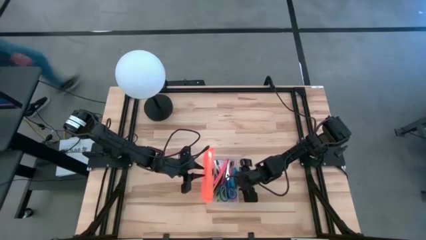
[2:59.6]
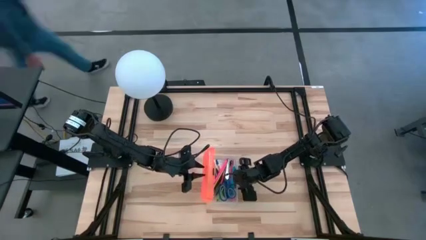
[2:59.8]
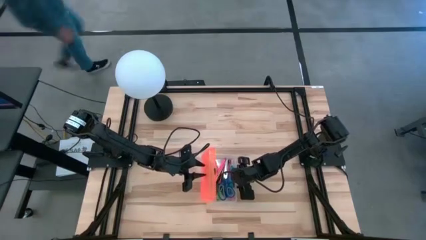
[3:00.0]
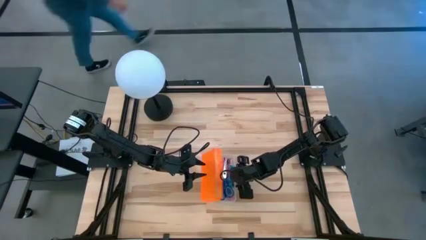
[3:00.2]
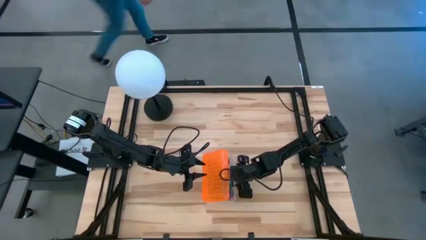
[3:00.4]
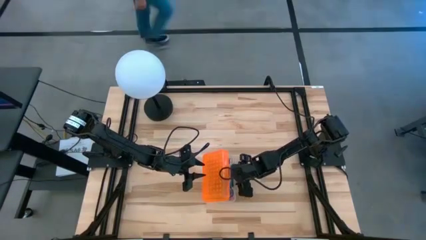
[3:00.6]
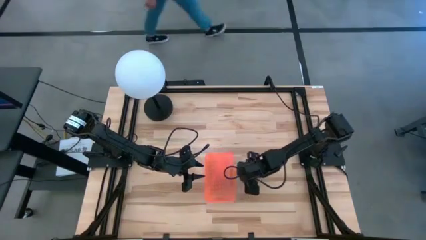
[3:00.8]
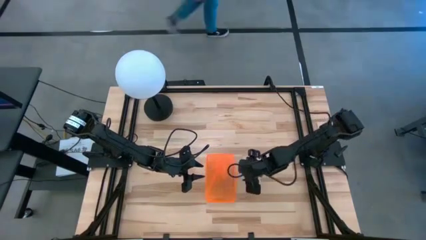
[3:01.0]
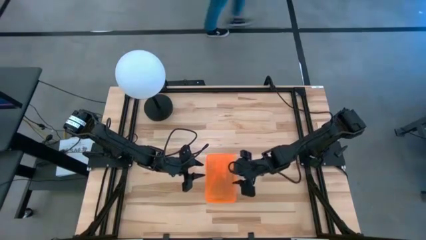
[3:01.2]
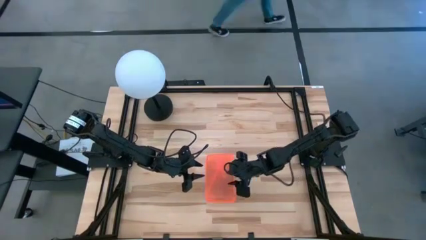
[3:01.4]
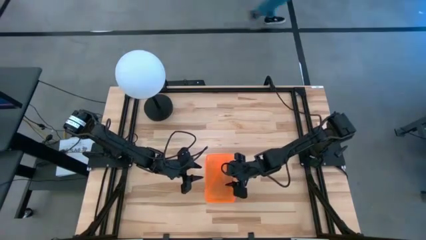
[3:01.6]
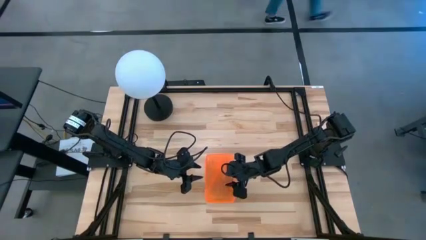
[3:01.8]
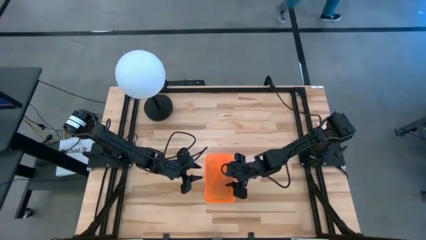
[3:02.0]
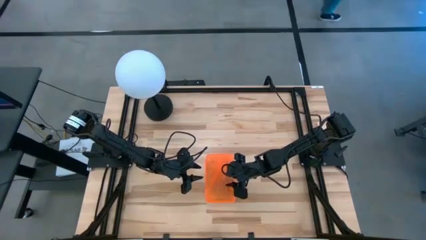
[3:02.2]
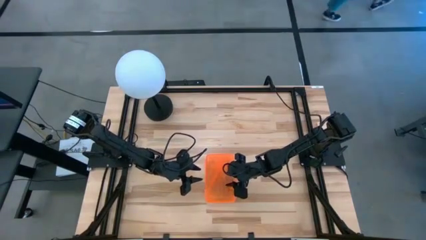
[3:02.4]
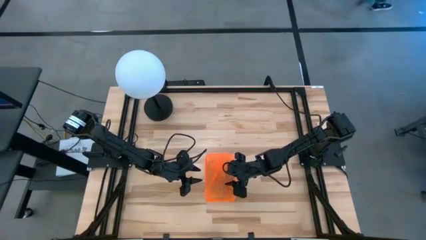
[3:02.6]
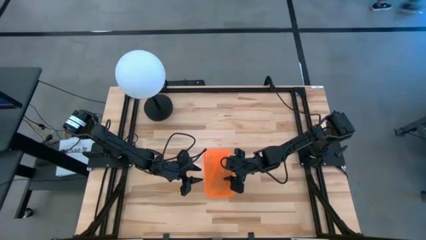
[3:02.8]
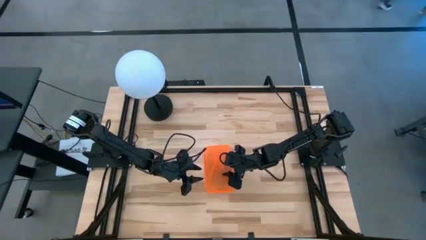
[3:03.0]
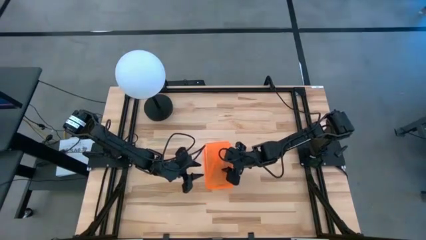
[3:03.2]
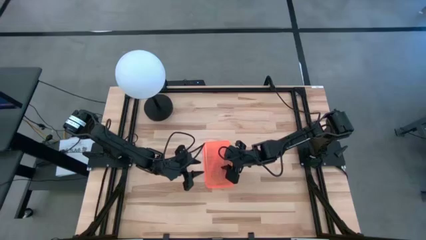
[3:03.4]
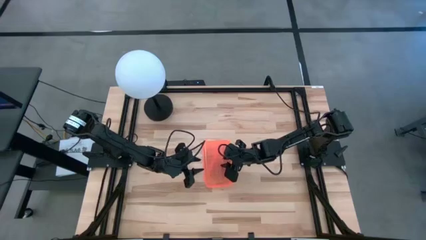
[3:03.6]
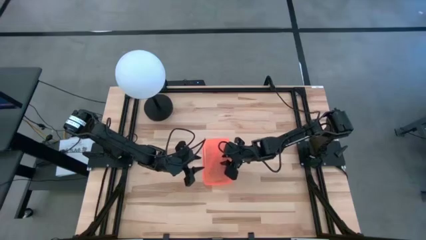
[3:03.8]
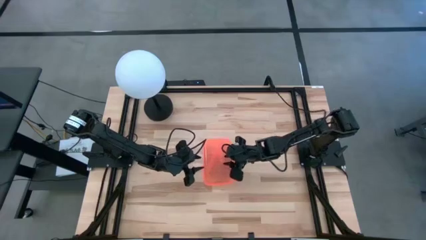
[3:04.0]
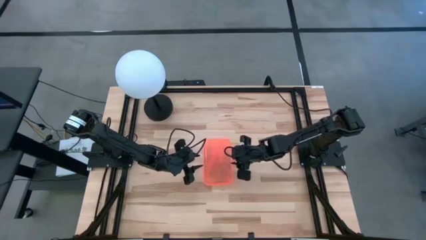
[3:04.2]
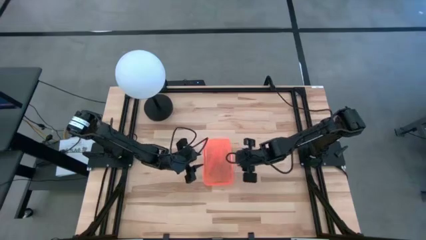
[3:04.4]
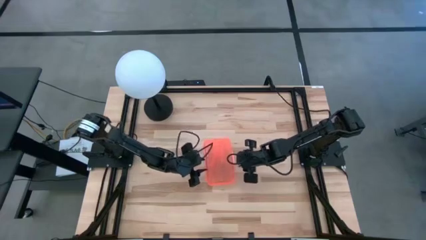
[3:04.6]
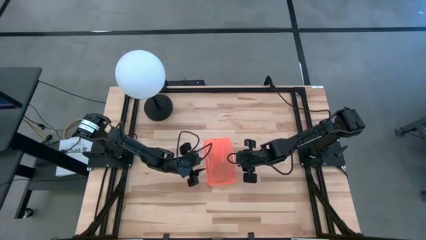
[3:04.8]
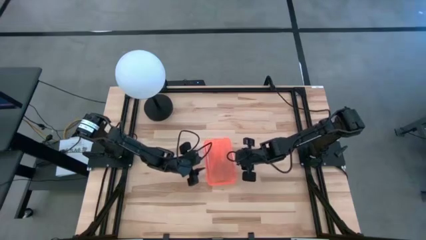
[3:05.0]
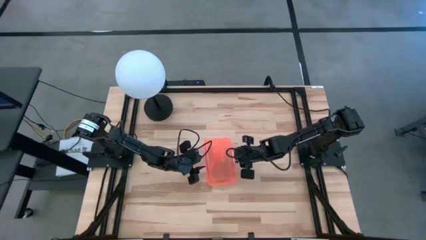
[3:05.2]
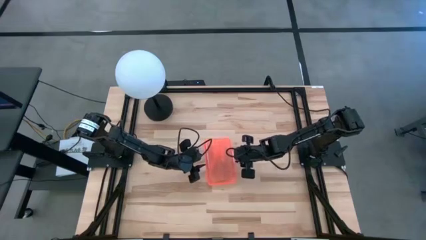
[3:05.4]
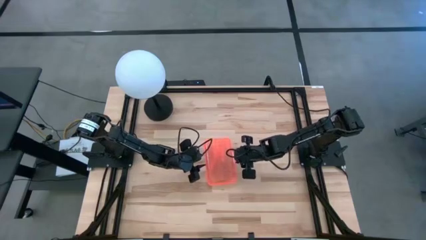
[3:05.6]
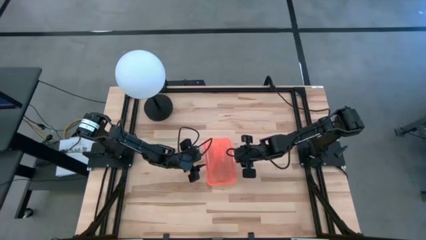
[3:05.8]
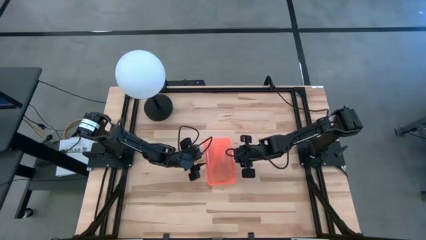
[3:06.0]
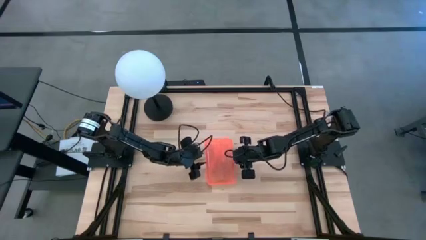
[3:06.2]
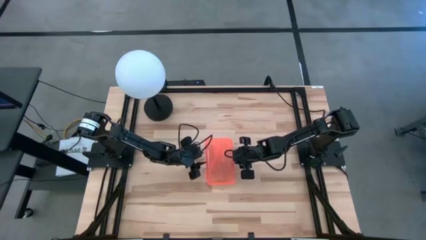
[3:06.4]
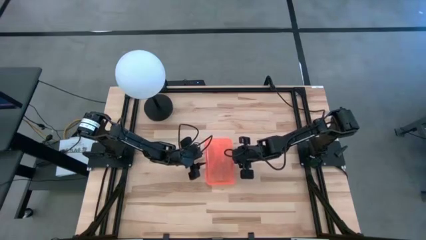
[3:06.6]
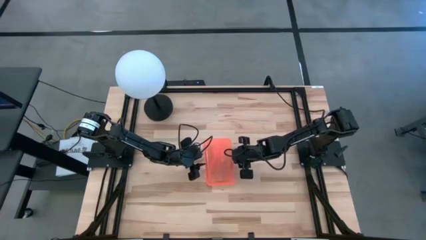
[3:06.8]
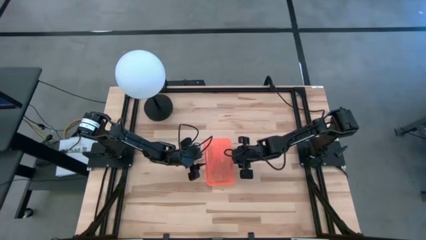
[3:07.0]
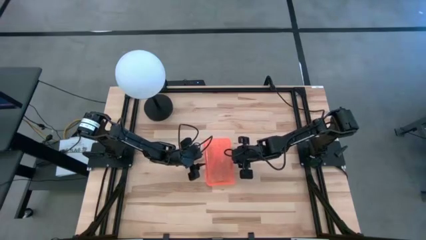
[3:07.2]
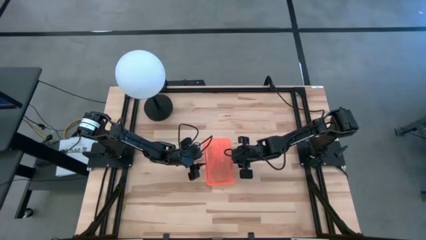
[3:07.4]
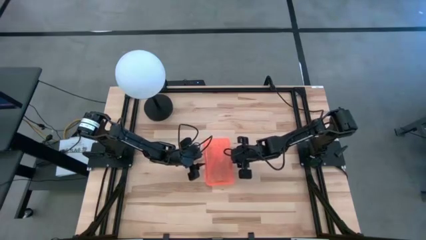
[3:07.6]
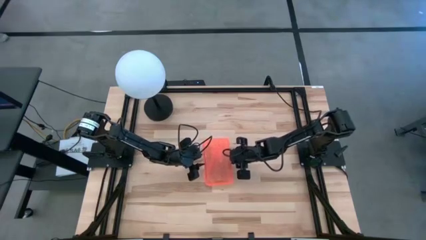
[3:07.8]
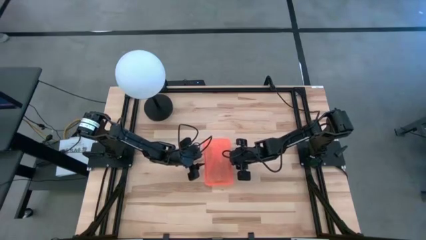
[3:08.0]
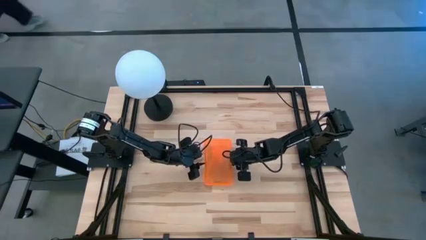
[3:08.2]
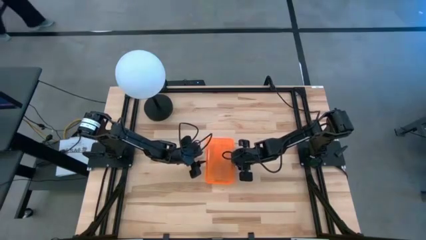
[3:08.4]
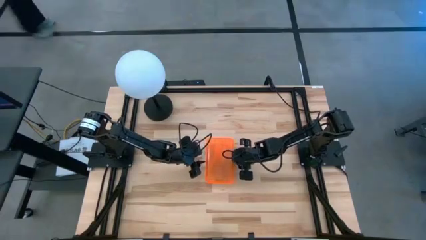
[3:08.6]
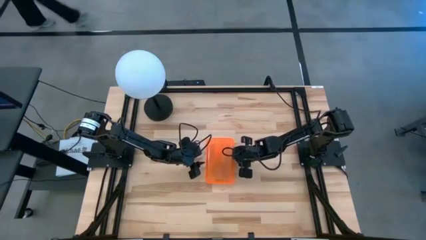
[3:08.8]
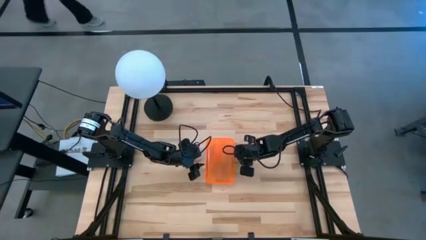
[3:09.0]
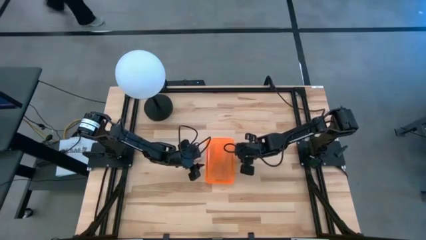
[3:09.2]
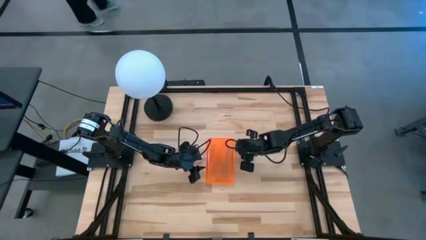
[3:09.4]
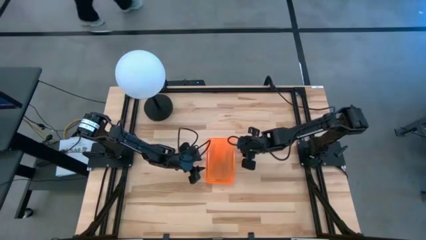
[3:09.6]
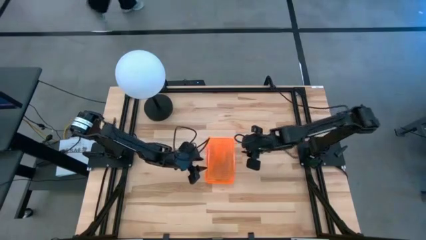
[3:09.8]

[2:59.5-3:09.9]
Task: Pick & place school supplies into a supply box
Close the supply box cover
